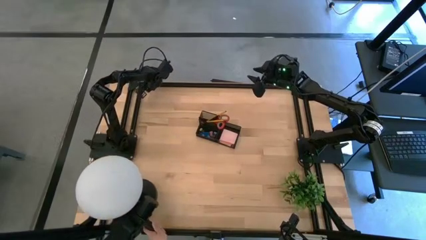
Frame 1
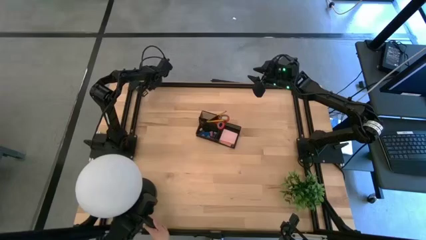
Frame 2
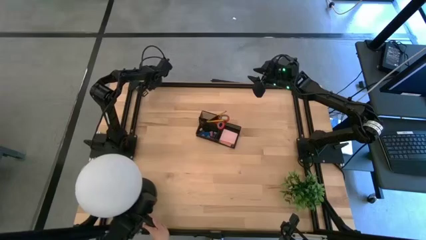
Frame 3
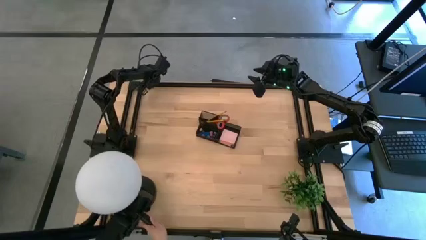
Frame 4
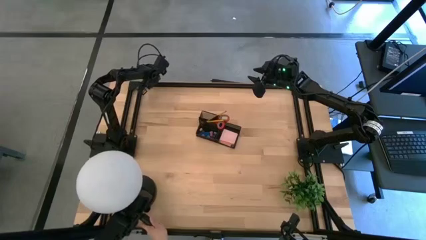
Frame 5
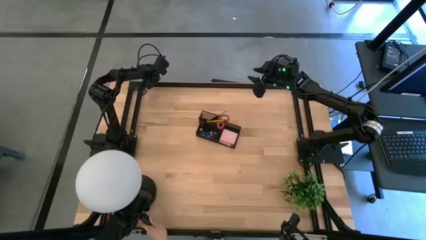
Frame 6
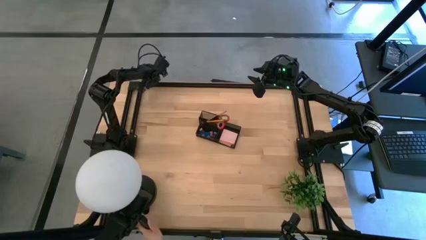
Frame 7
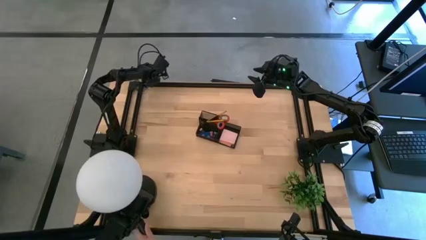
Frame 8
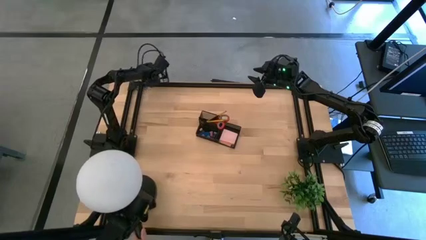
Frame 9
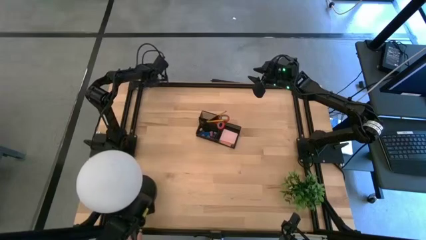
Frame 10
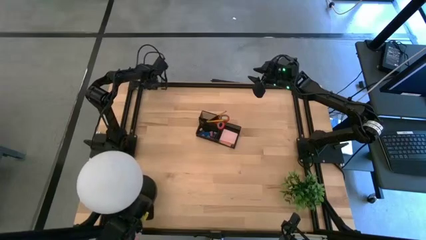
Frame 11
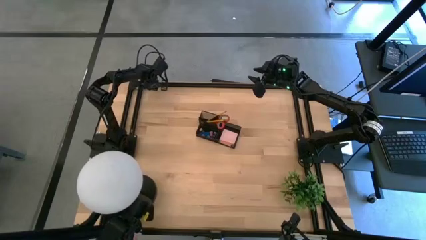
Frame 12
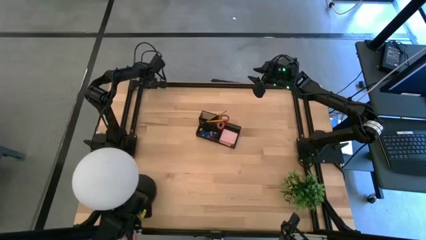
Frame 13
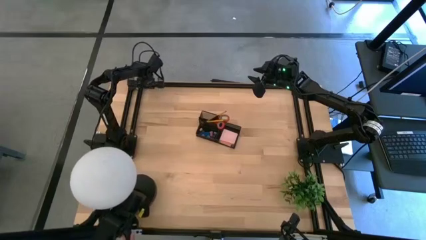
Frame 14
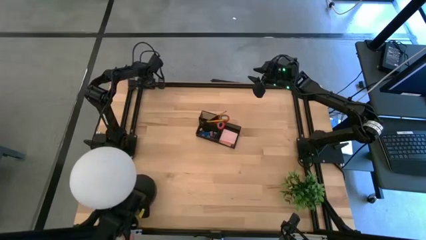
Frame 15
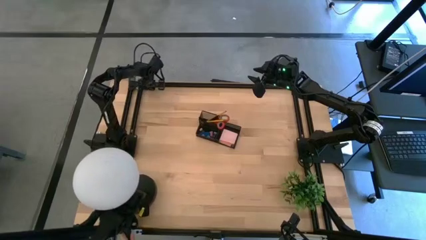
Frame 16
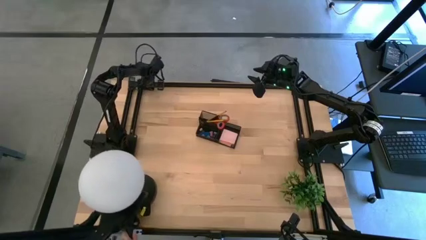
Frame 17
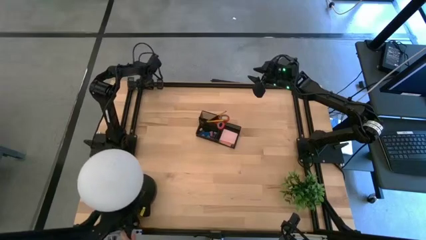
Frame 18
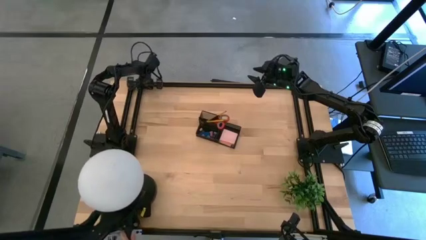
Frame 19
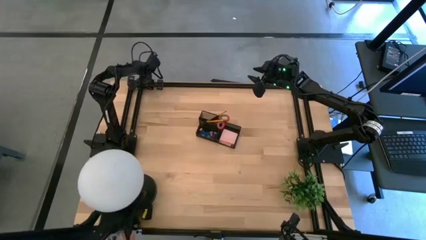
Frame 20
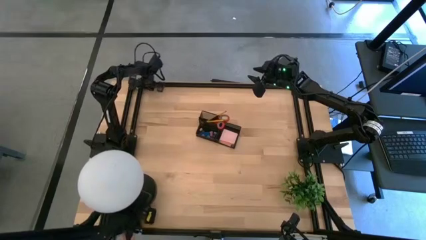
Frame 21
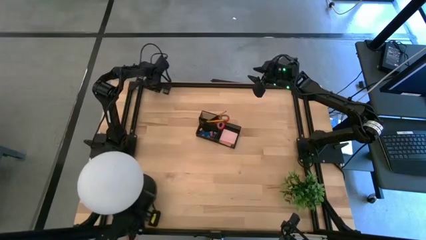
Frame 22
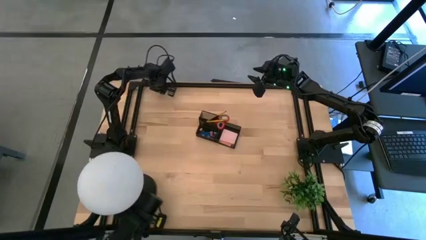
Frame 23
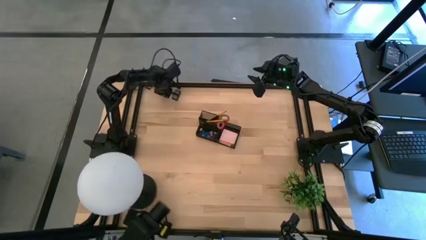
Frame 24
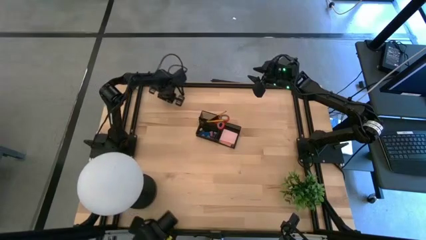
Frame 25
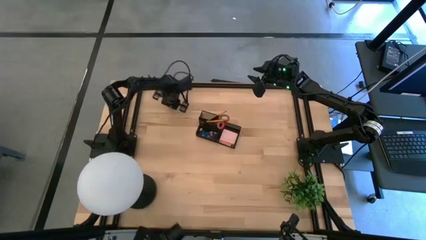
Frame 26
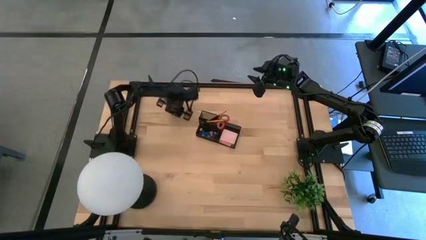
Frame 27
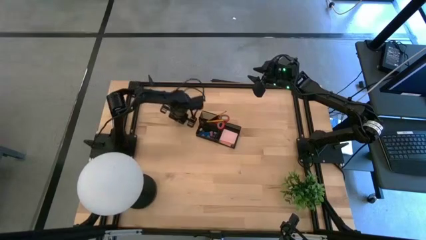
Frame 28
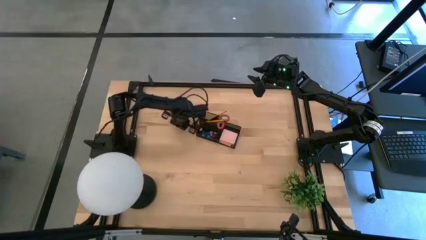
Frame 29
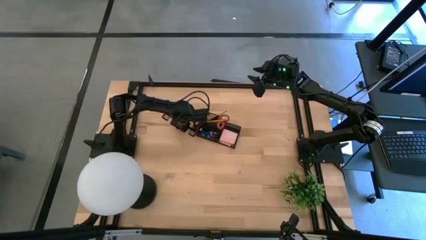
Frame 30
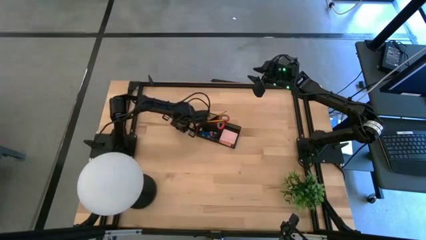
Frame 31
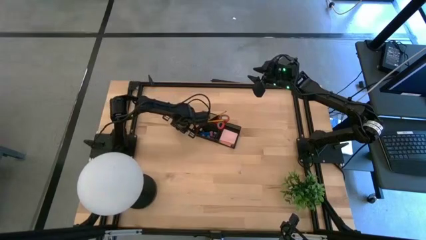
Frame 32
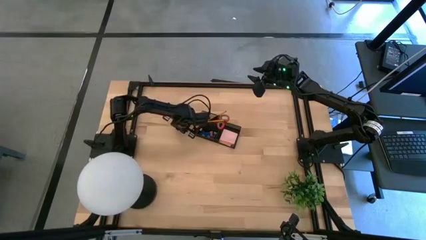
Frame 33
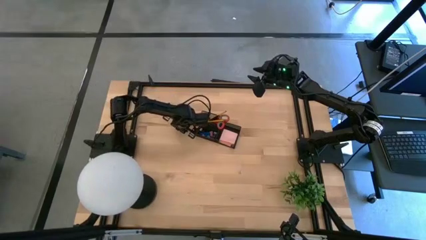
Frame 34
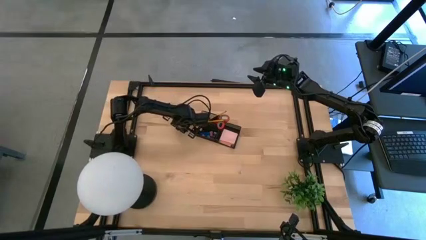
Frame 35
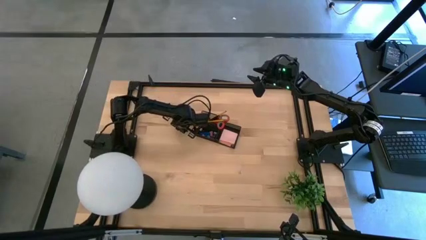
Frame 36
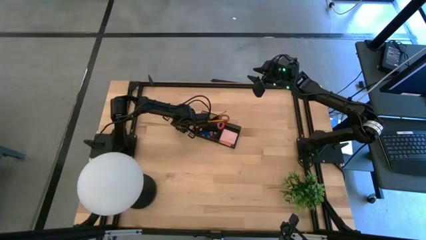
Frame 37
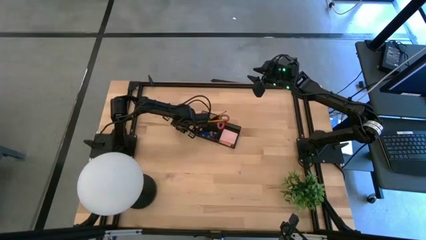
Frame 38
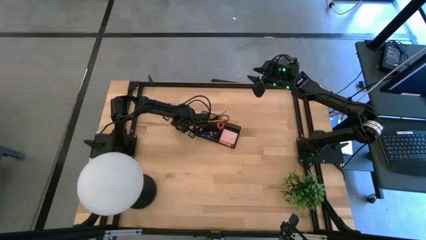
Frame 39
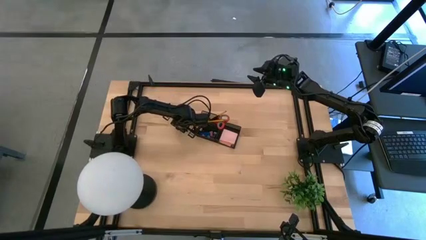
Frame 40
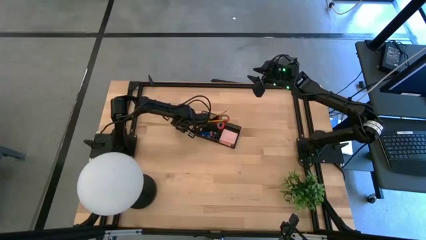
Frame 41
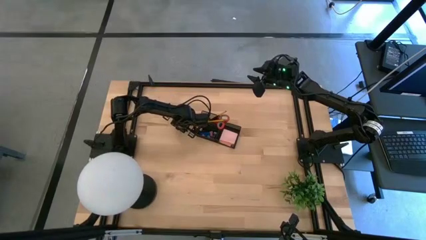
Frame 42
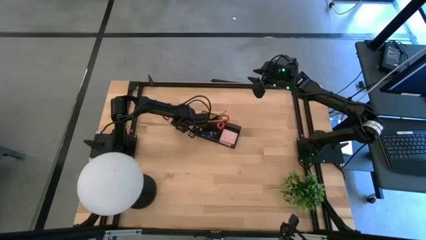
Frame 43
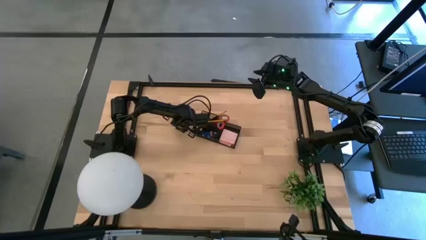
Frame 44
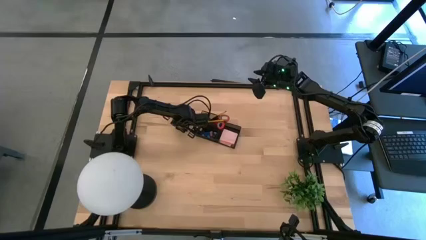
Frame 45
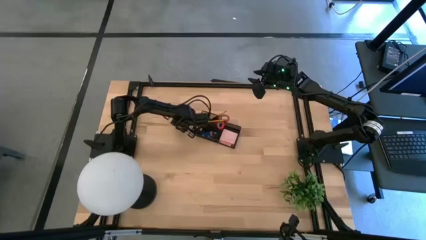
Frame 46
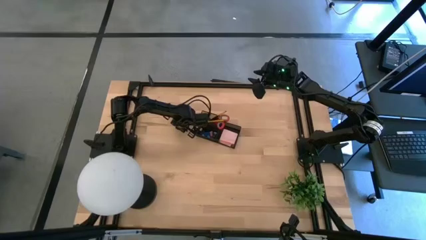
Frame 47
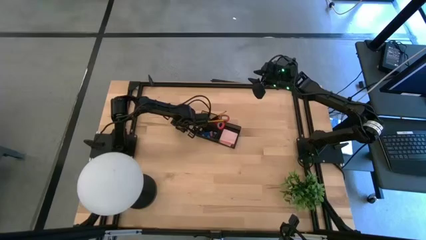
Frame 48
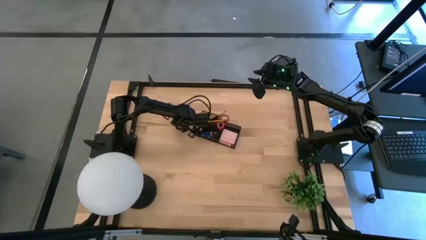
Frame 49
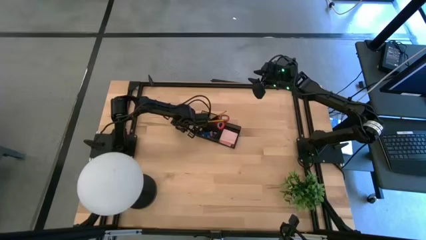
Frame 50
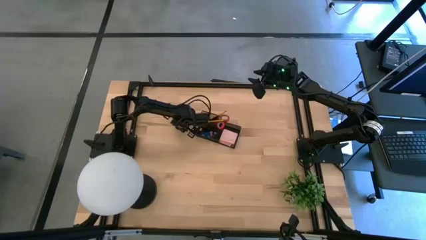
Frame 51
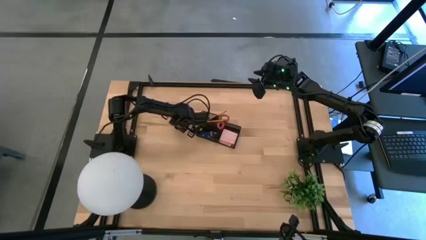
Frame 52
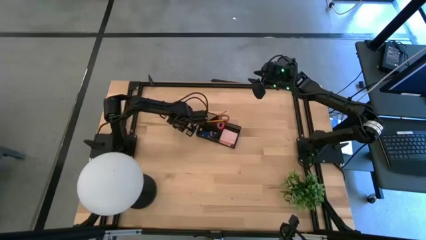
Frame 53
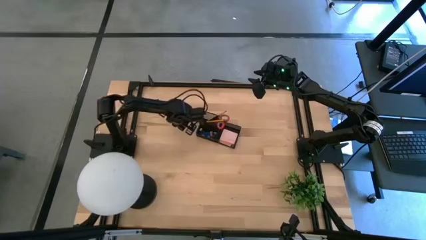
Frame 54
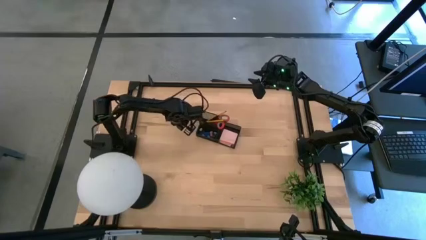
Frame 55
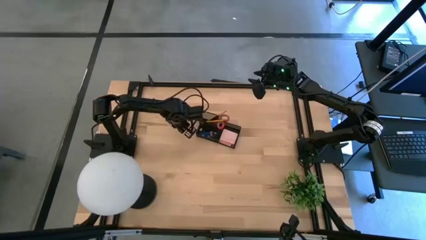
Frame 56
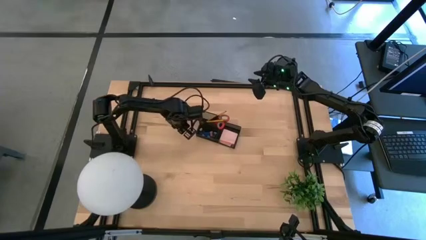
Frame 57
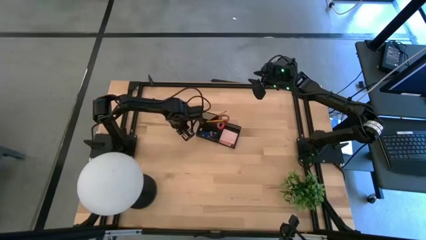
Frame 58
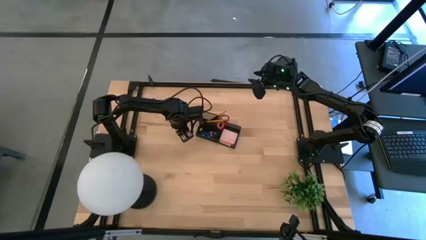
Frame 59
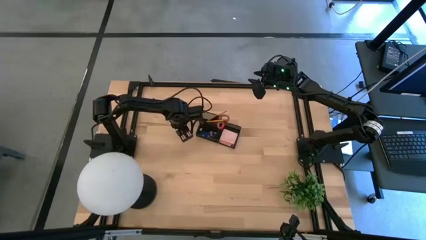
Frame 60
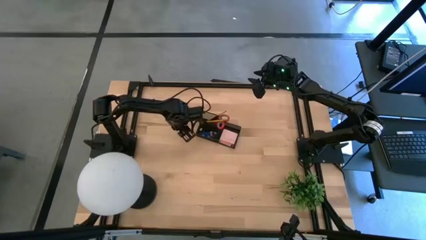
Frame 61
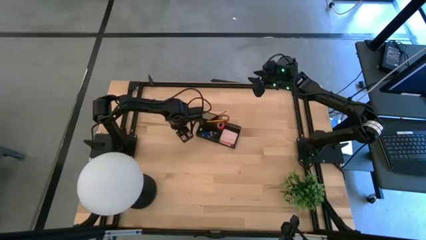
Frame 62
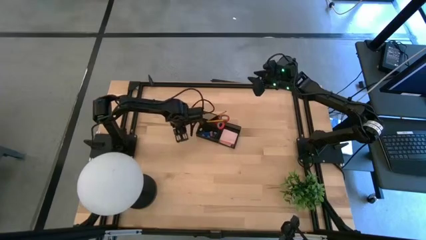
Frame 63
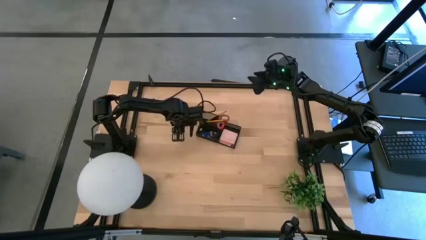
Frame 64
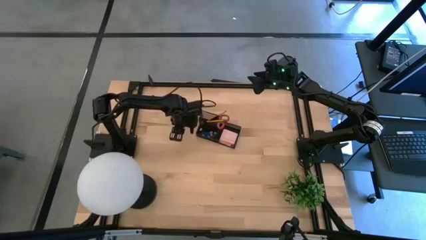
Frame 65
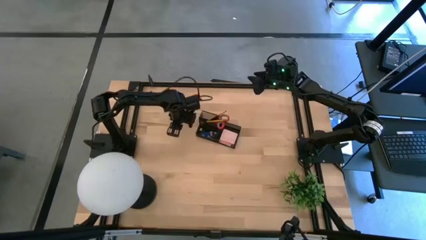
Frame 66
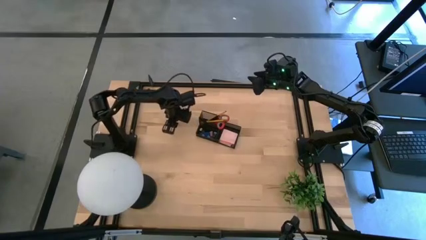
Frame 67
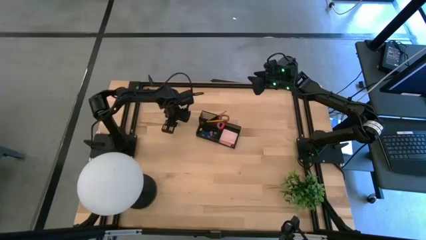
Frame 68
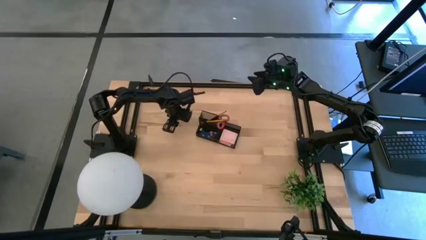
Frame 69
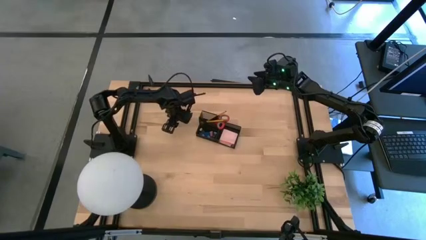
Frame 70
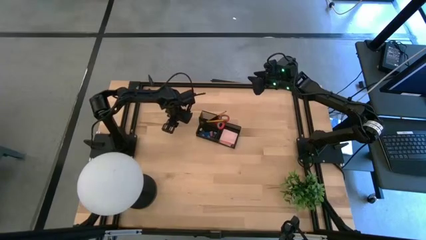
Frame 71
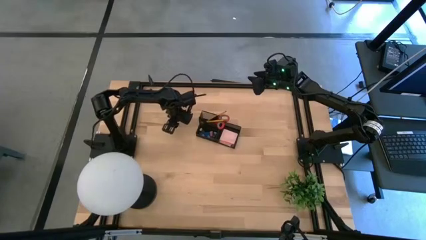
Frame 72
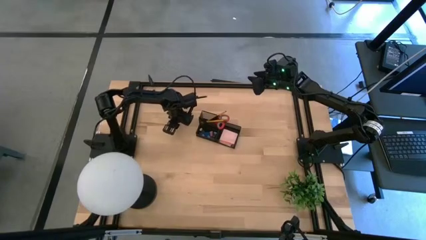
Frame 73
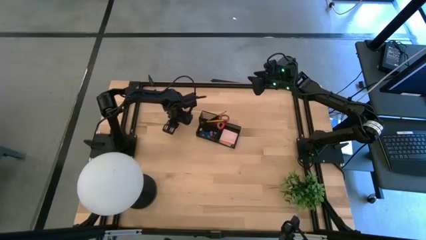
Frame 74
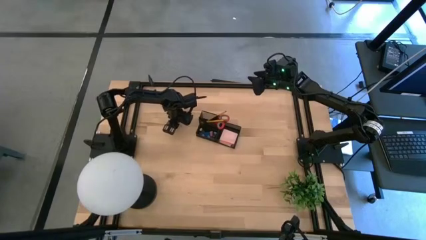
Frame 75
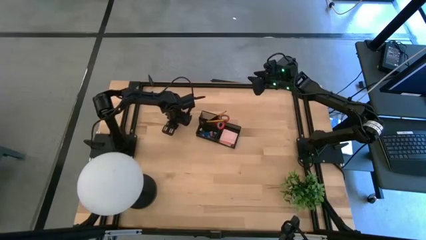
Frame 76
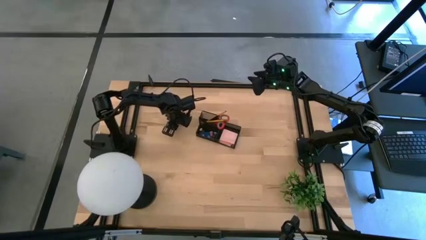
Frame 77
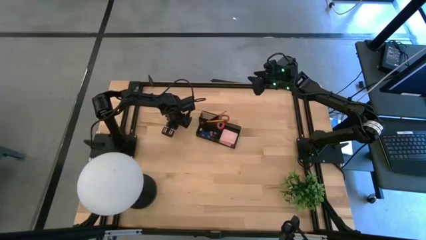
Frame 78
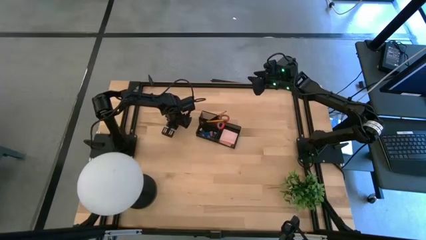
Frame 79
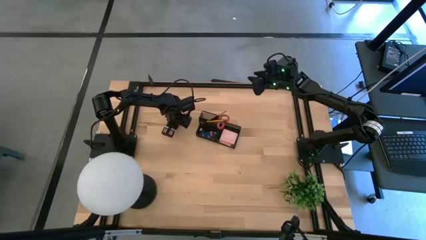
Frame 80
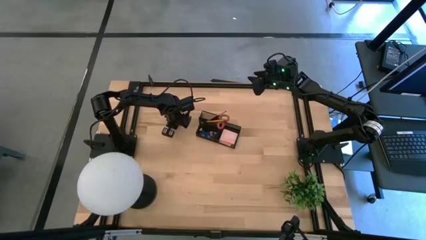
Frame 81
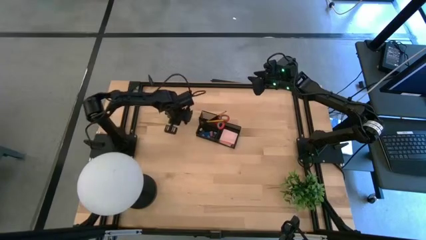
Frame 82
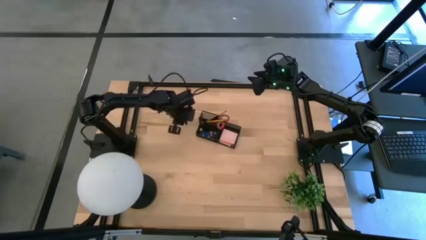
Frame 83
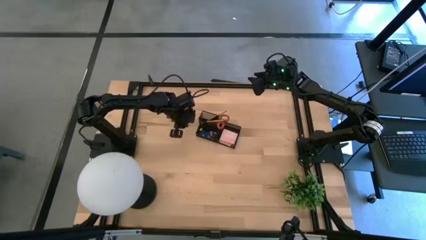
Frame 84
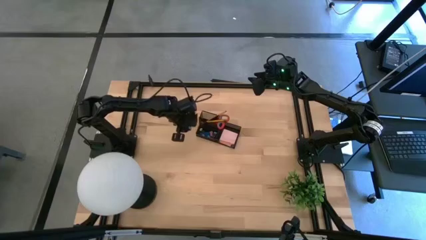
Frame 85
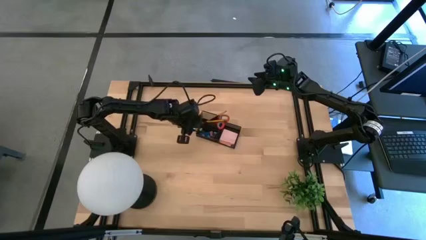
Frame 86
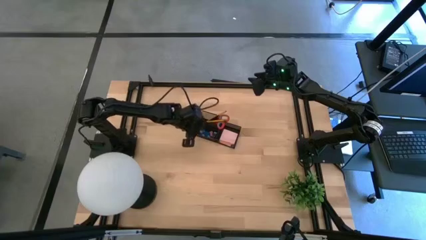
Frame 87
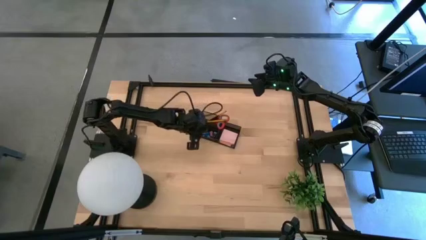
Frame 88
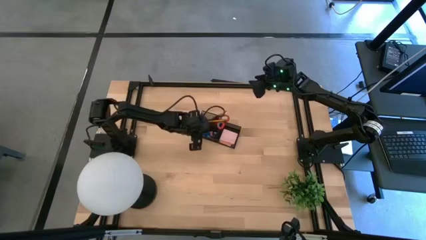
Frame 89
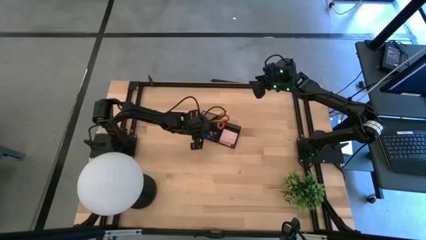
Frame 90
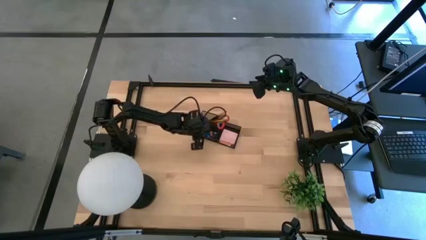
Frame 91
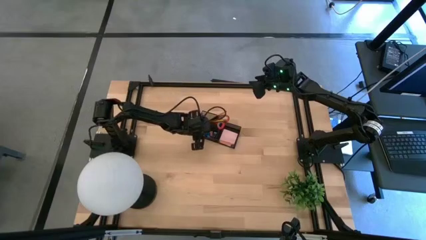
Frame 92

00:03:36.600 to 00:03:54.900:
Task: Pick and place office supplies into organizer
Put the blue binder clip into the desk organizer
